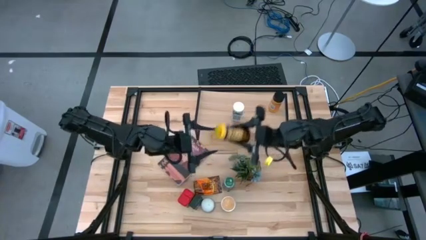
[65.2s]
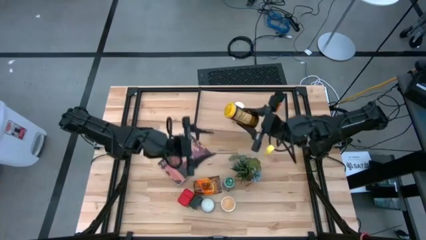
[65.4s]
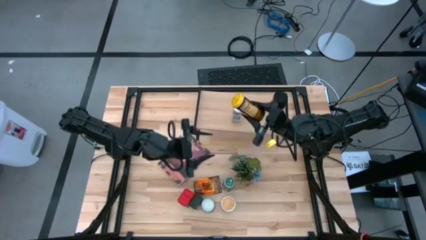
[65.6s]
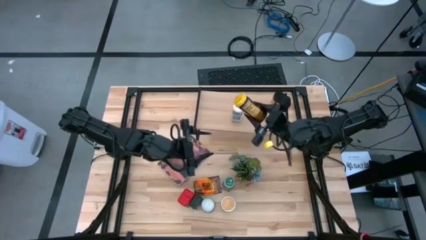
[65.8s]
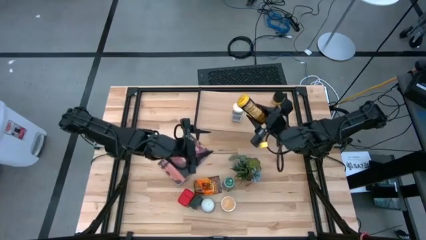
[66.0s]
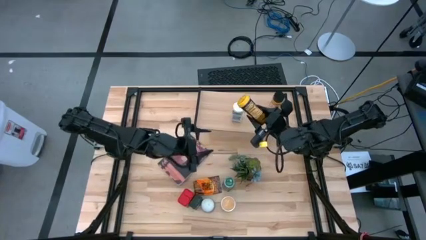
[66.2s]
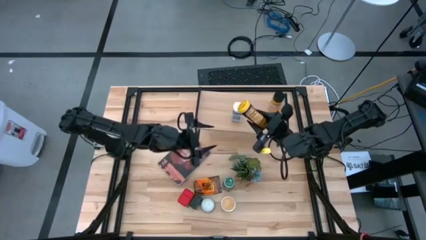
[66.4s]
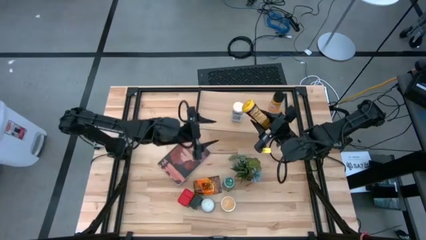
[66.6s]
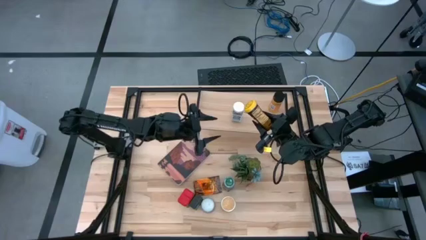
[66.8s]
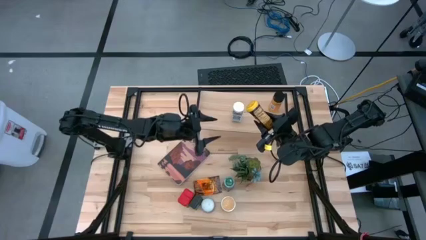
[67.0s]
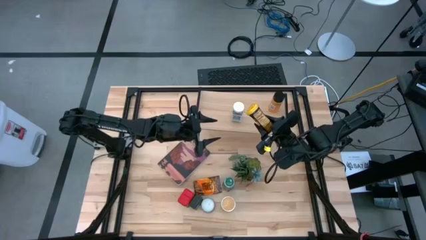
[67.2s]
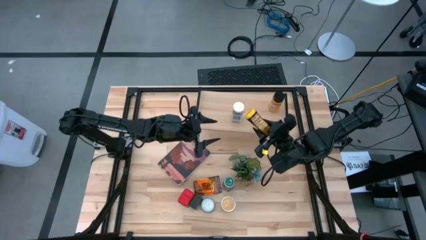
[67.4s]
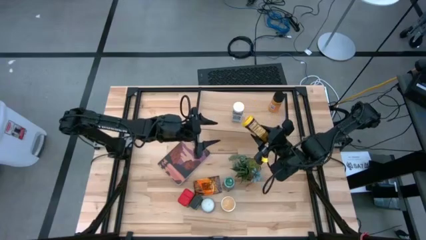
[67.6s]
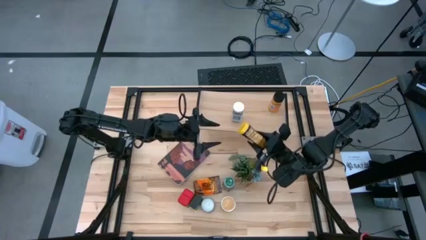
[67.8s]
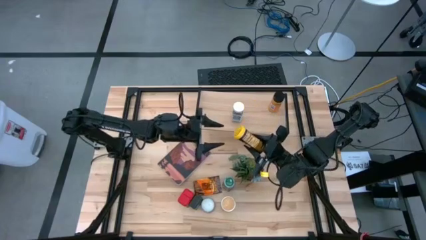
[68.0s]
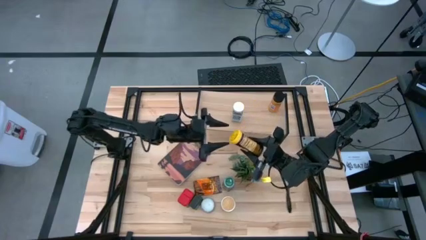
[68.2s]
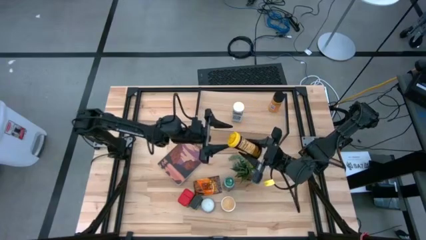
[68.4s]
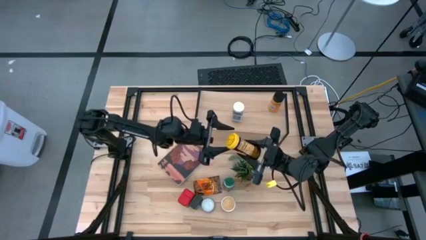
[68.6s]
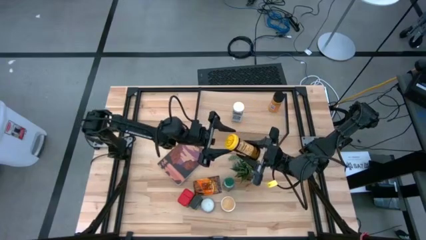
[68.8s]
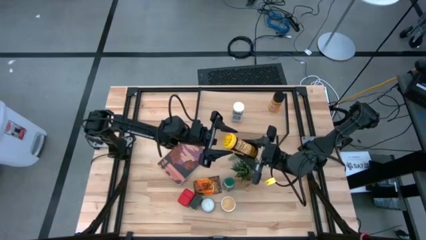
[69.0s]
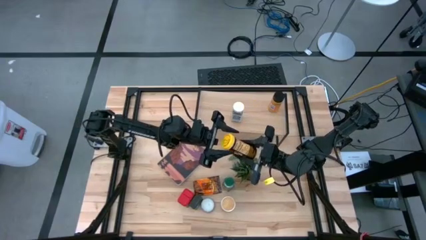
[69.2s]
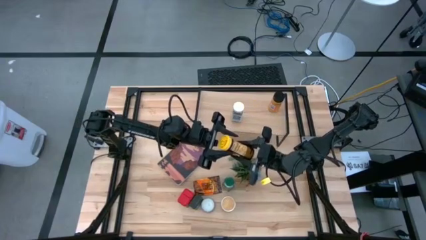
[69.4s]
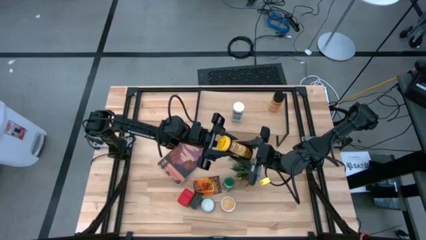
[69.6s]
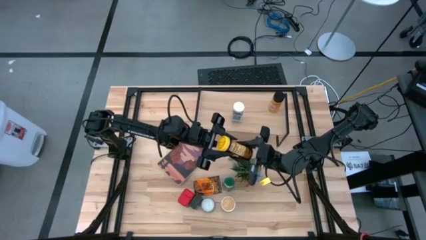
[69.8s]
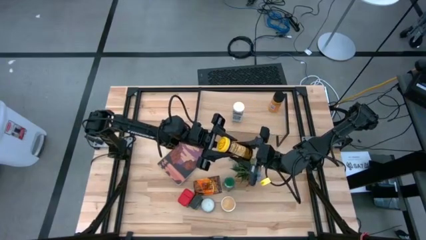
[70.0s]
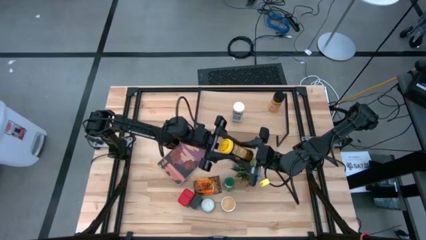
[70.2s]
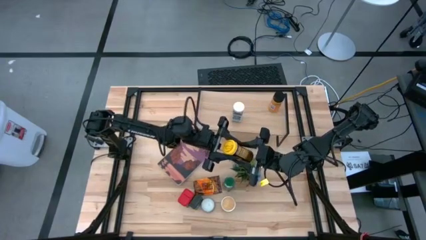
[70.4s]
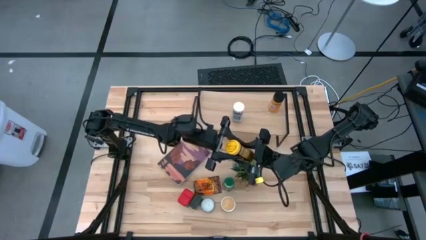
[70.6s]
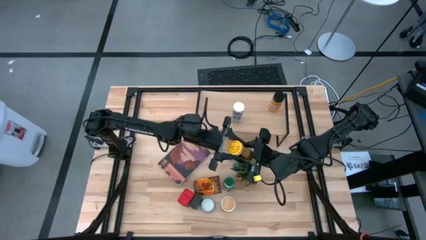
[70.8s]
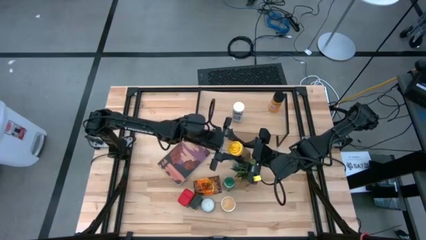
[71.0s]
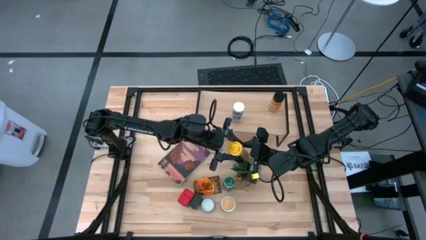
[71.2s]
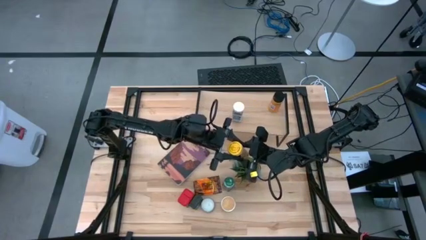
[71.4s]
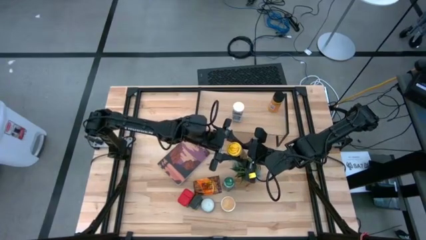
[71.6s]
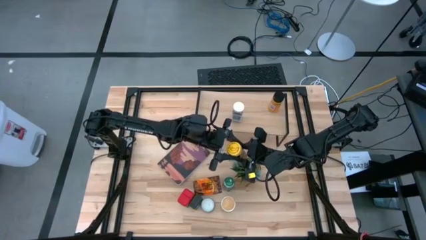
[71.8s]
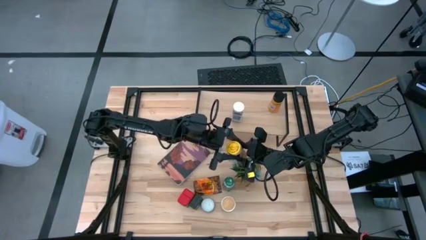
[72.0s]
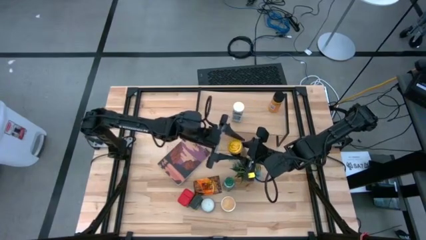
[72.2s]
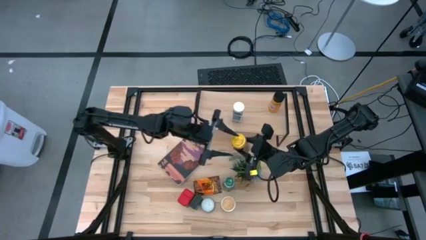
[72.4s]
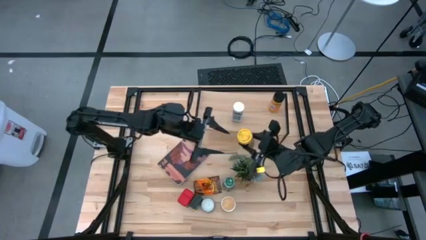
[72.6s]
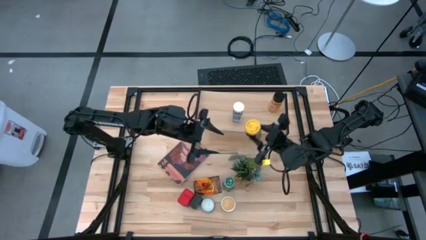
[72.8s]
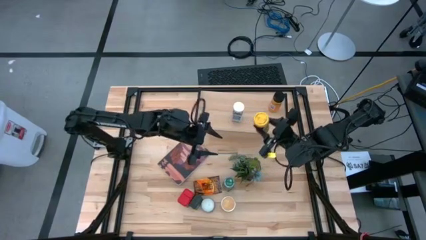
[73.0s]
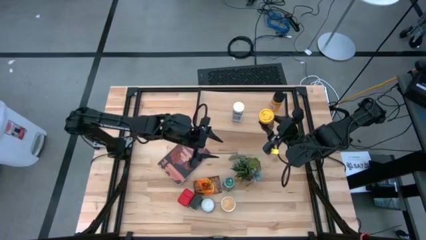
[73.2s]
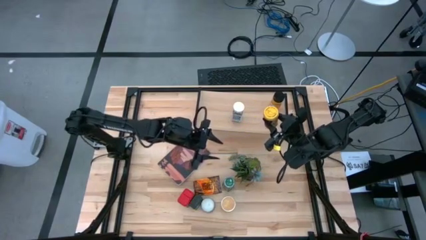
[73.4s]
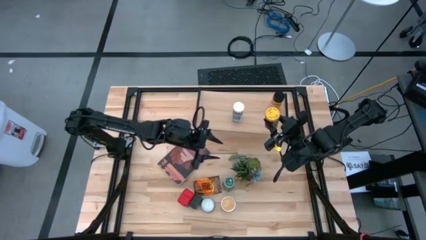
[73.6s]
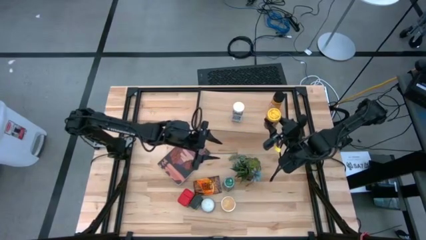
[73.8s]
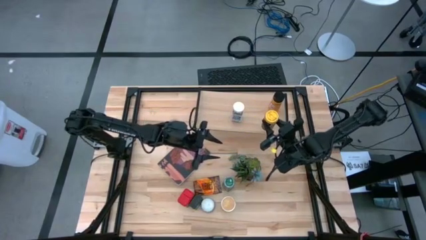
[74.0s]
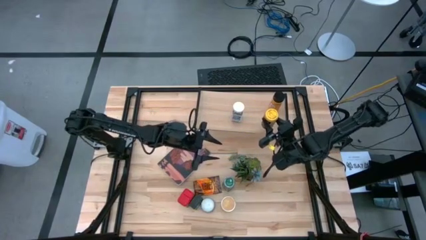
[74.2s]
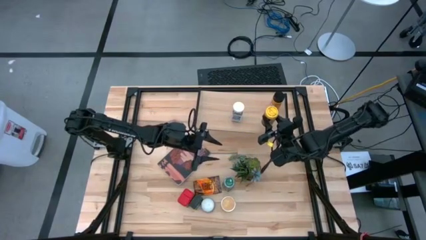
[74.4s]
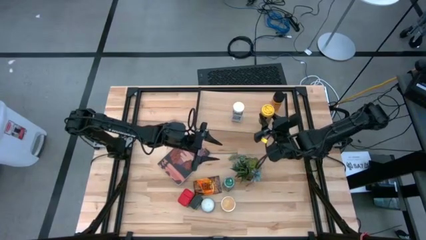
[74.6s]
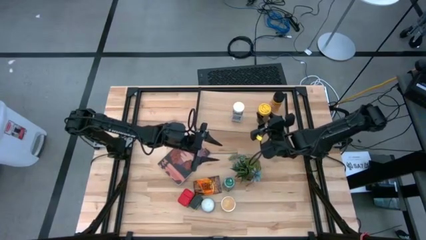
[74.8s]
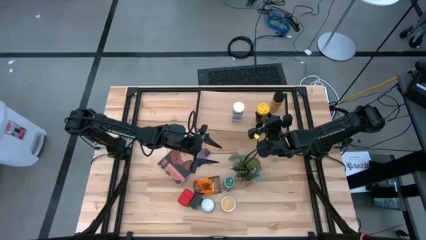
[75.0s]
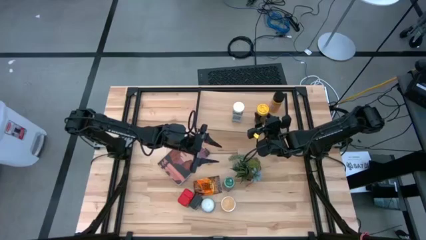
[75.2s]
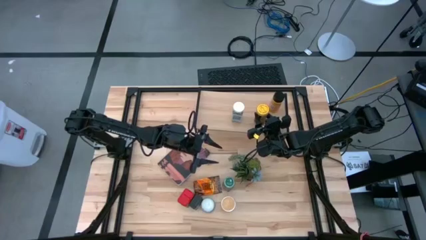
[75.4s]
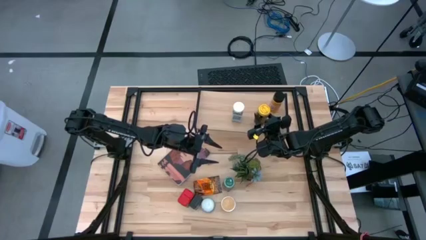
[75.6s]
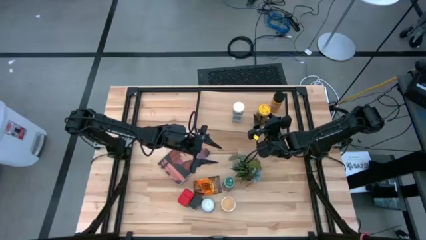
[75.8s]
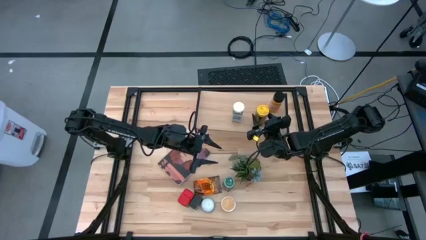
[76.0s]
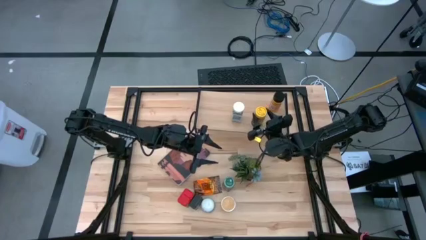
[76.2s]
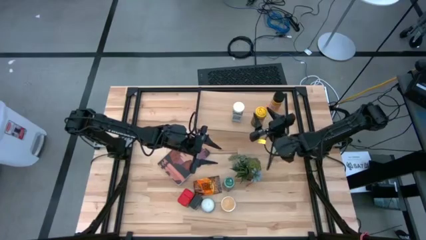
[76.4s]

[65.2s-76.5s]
Task: Shelf spices
Put the yellow seasoning bottle on the shelf

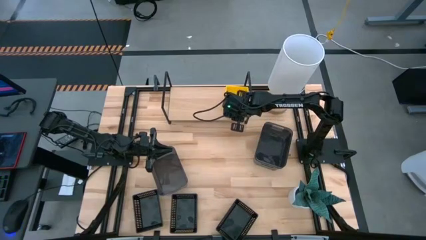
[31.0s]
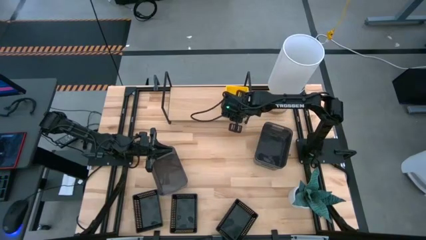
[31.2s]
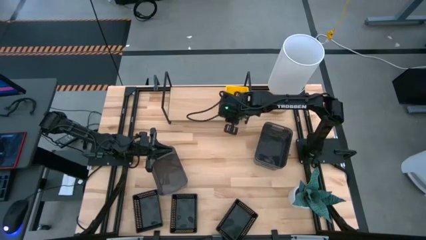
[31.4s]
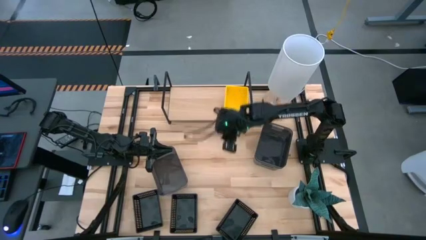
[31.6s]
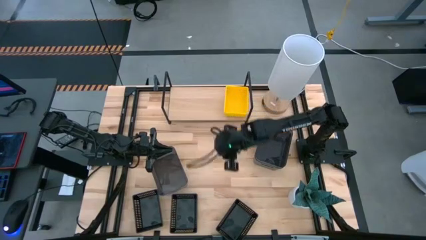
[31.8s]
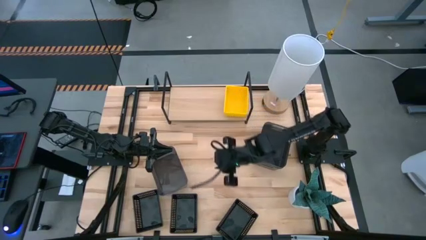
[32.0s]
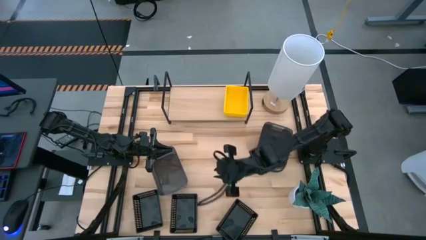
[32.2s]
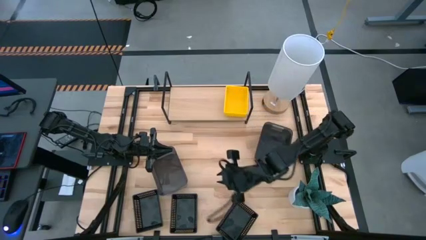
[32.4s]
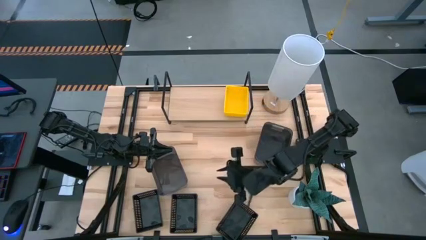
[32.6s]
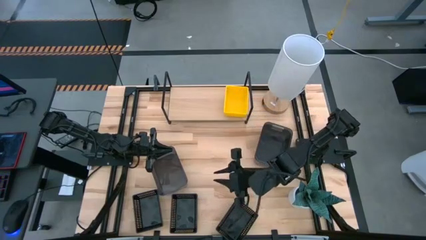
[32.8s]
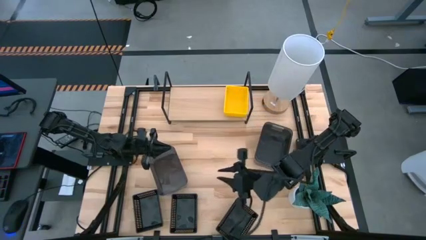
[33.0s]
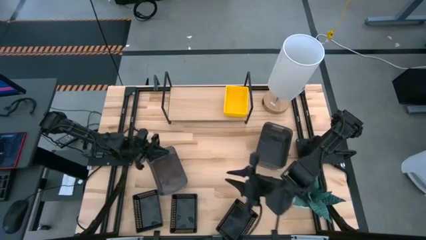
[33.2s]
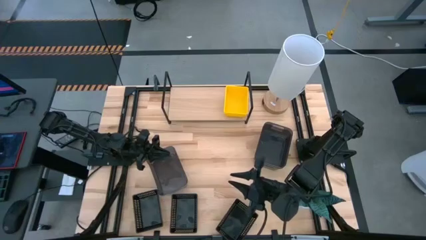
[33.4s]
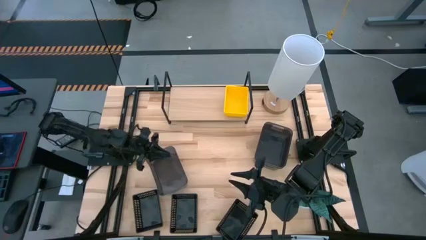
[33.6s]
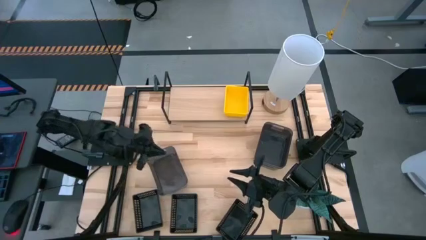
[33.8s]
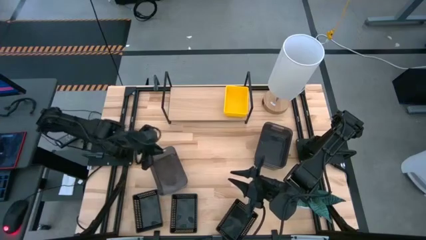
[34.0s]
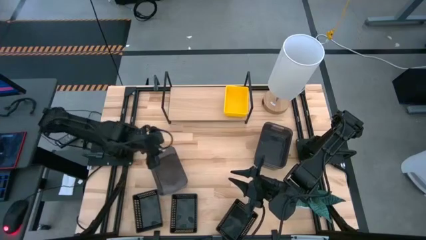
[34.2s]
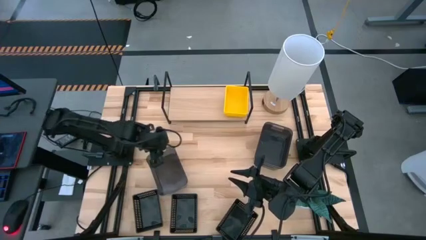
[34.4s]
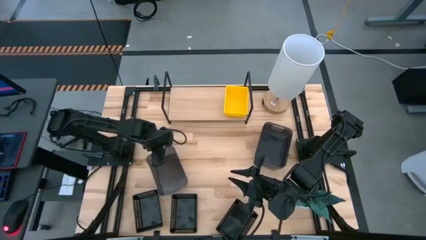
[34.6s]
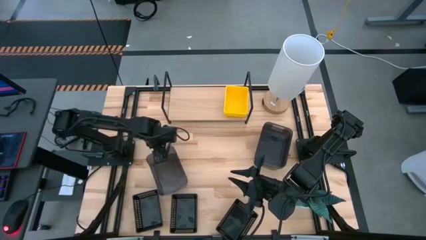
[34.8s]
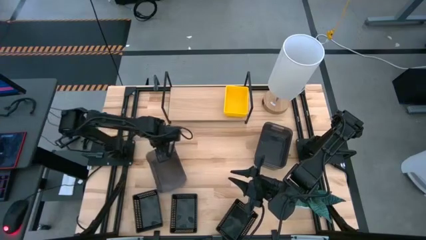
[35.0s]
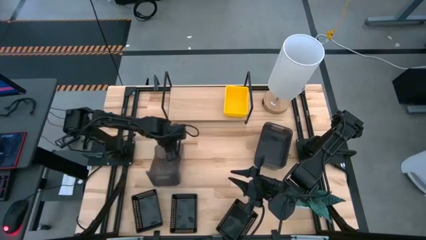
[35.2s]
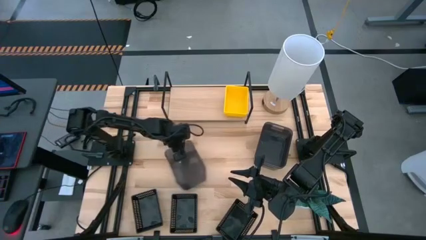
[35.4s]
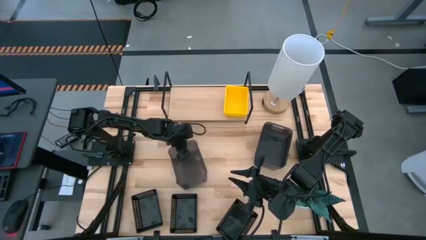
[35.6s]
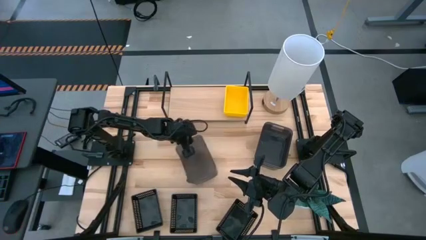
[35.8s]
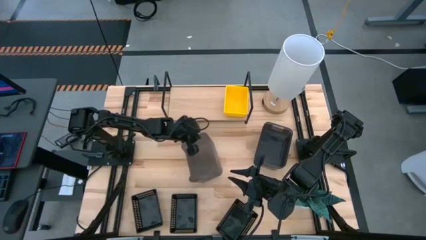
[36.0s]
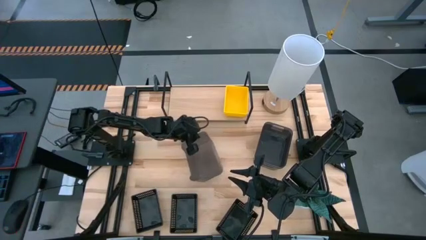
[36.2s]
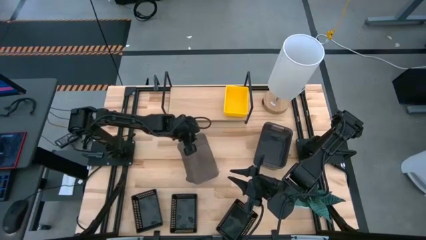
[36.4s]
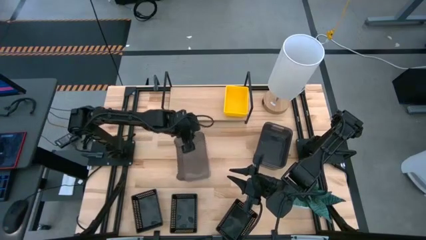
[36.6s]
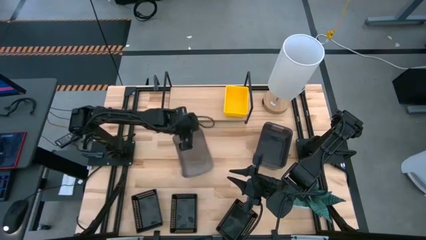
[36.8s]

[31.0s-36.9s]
Task: Stack baskets on shelf by color
Adjust the black bin

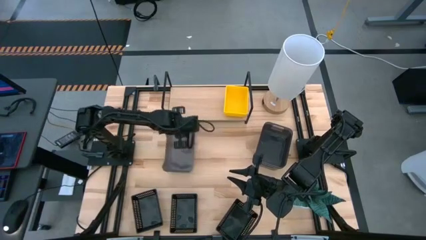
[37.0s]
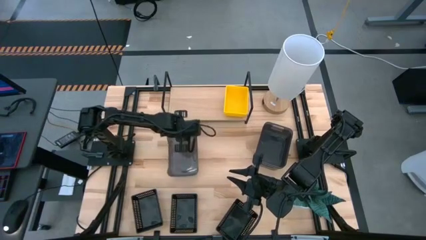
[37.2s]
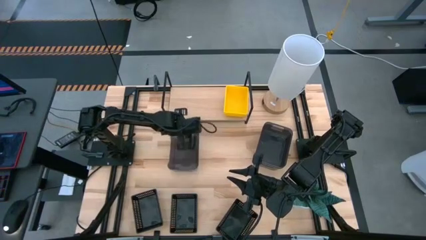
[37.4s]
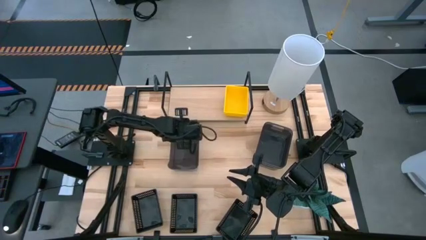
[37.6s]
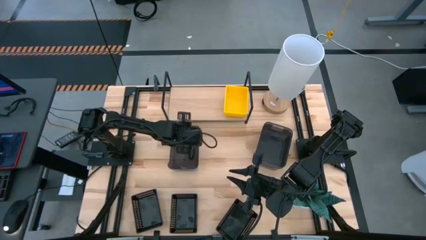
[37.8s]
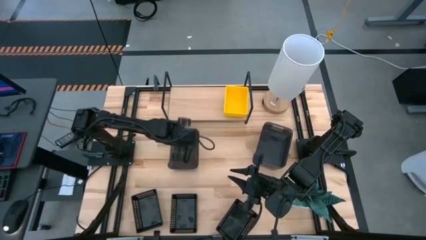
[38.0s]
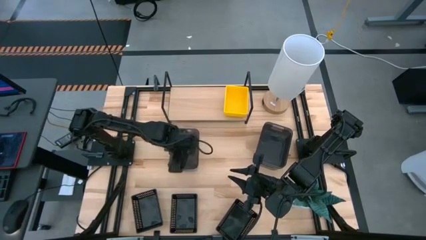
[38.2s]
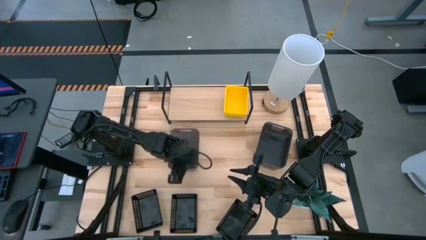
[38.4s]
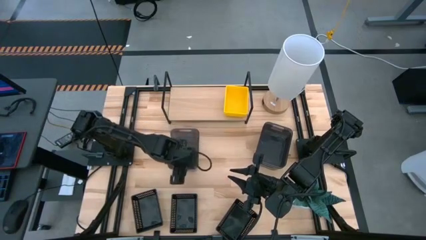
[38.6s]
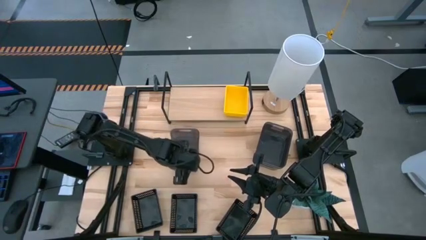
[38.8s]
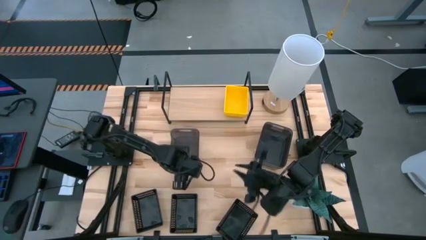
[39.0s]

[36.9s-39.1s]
Adjust the stacked black bin
